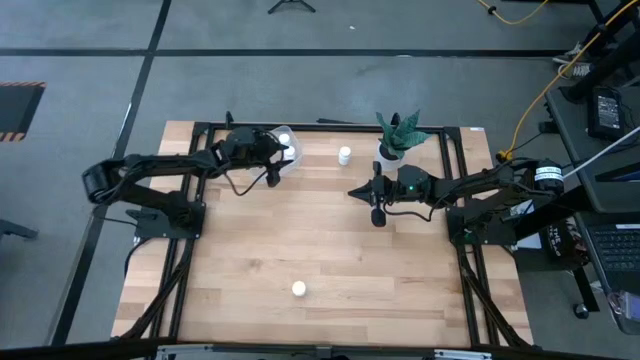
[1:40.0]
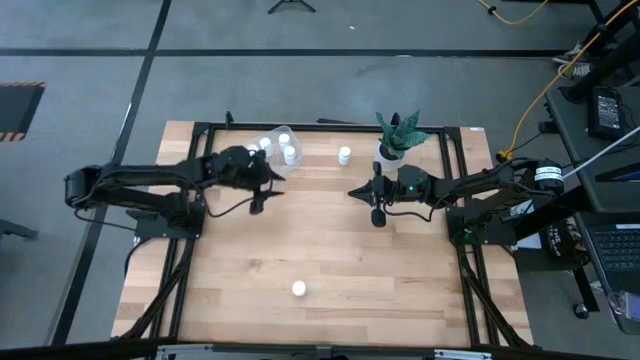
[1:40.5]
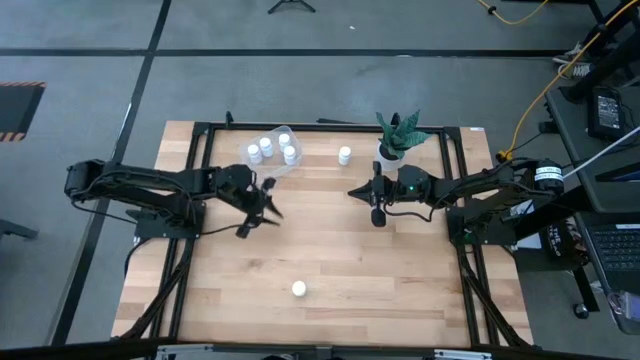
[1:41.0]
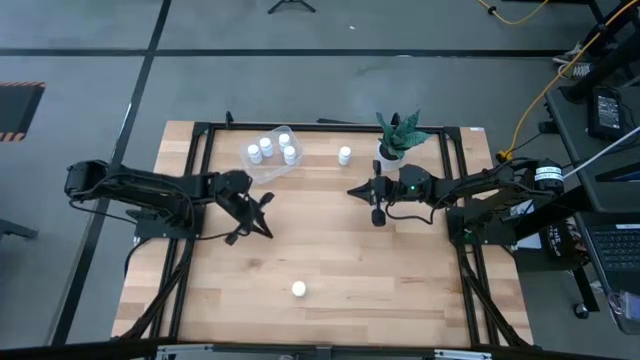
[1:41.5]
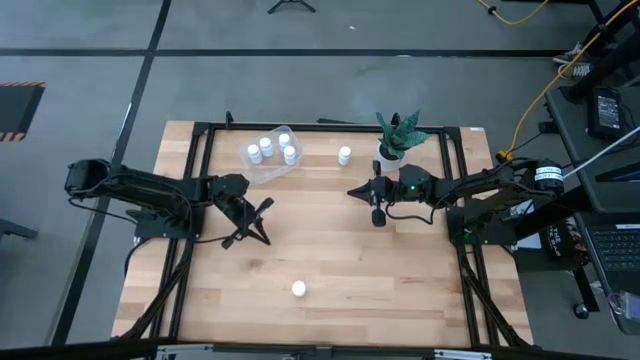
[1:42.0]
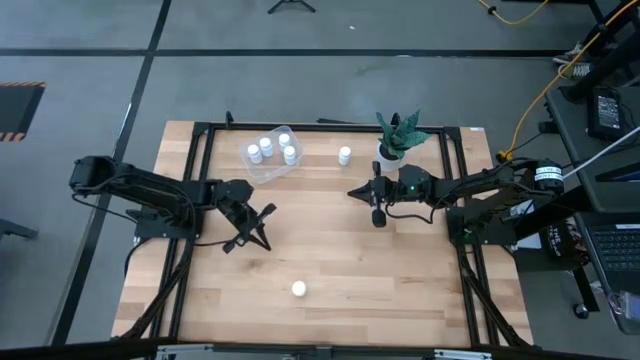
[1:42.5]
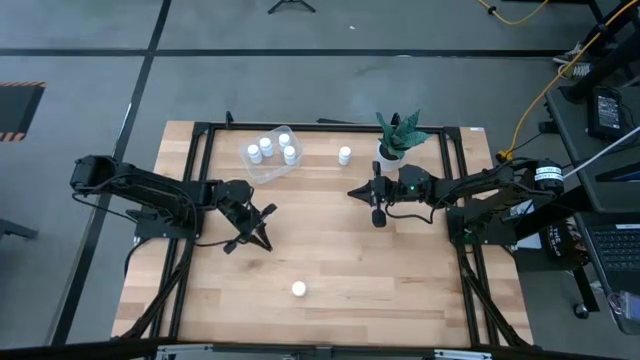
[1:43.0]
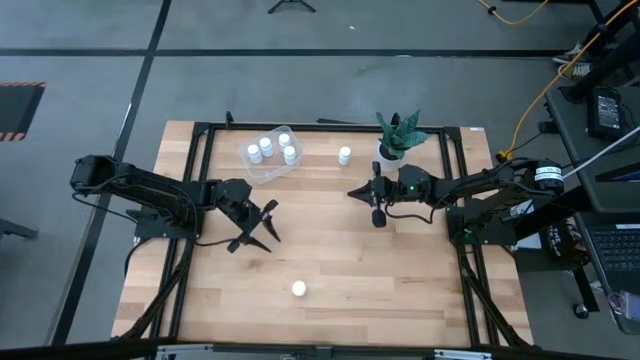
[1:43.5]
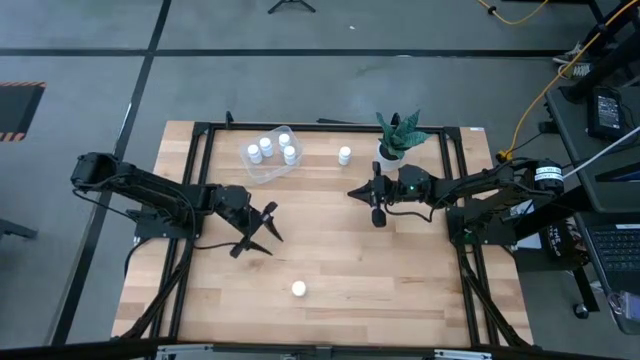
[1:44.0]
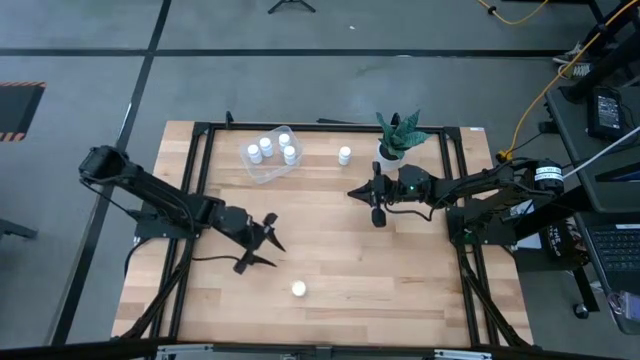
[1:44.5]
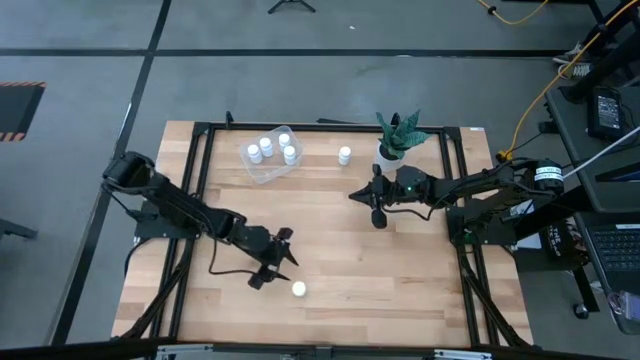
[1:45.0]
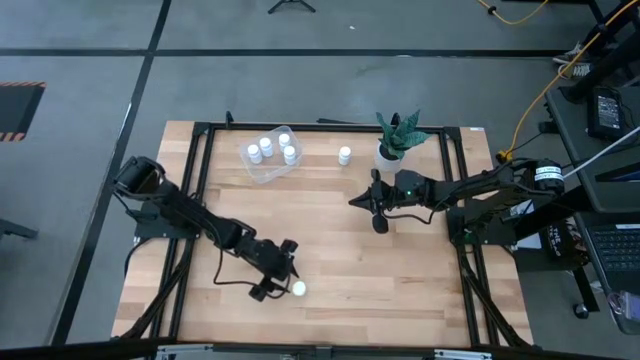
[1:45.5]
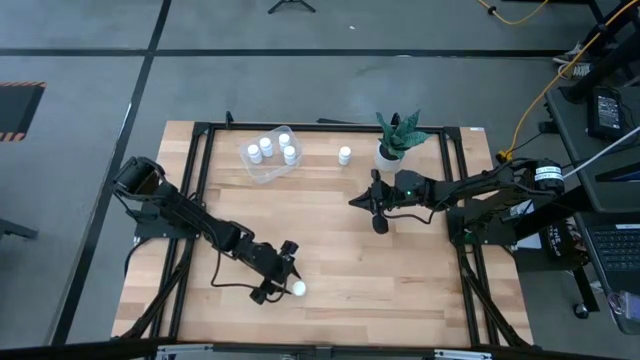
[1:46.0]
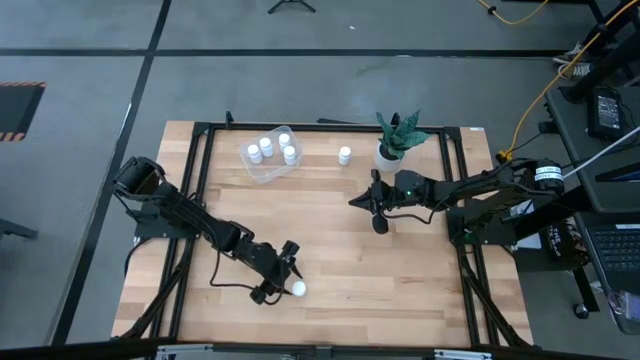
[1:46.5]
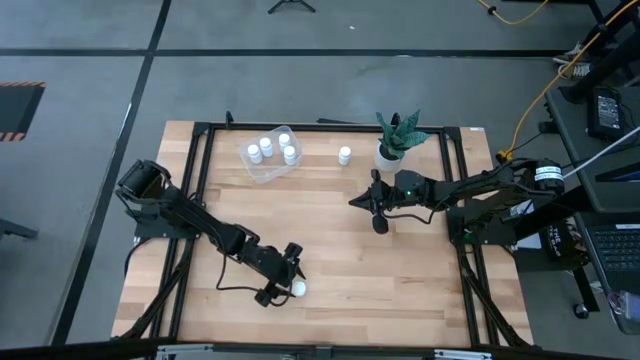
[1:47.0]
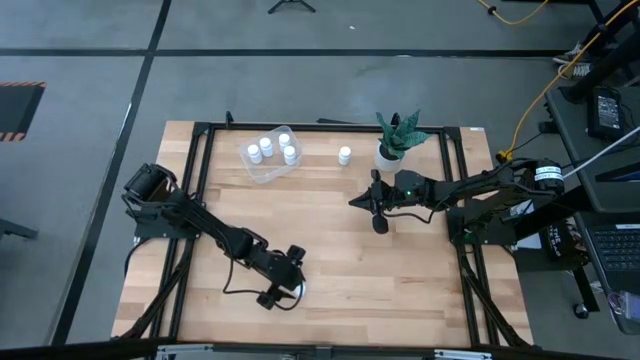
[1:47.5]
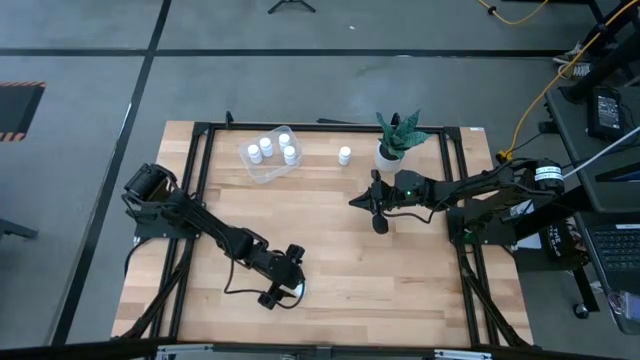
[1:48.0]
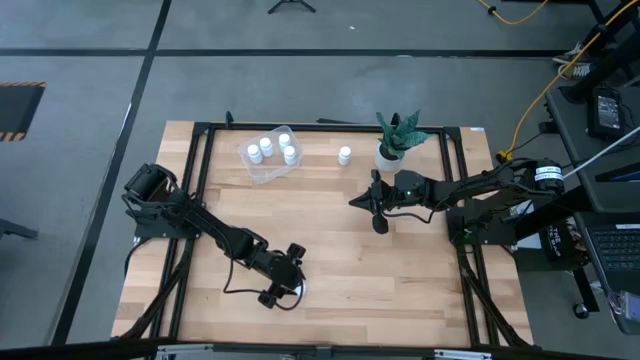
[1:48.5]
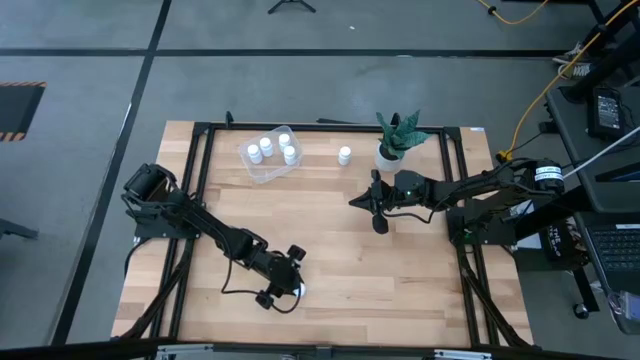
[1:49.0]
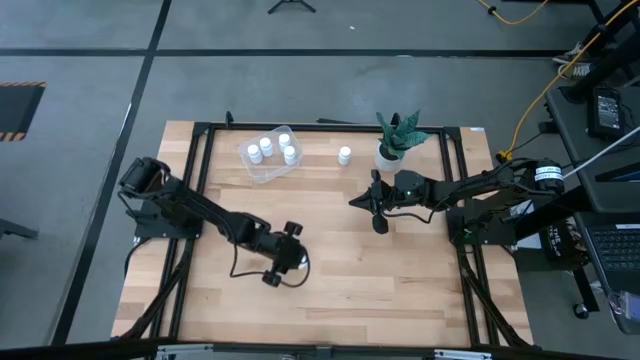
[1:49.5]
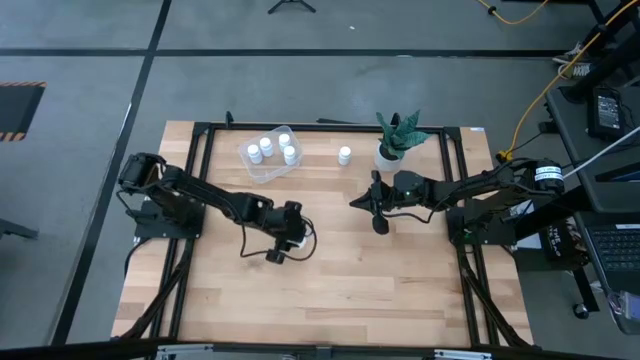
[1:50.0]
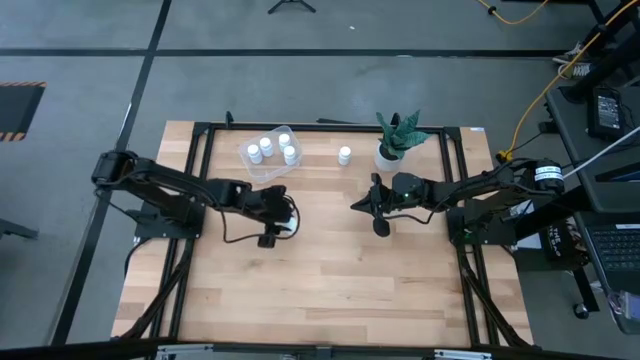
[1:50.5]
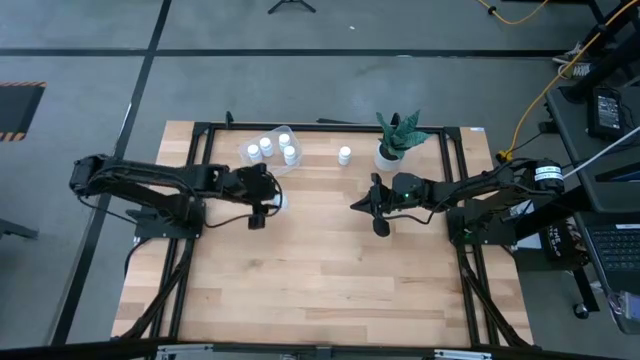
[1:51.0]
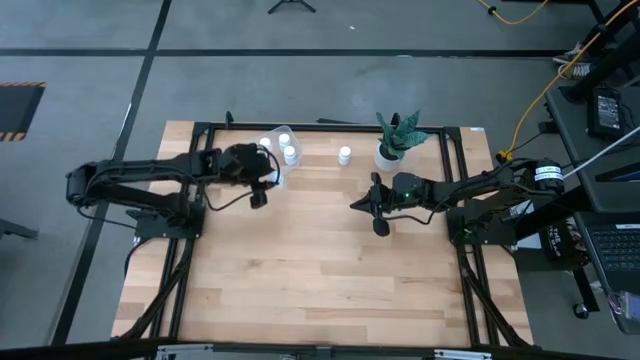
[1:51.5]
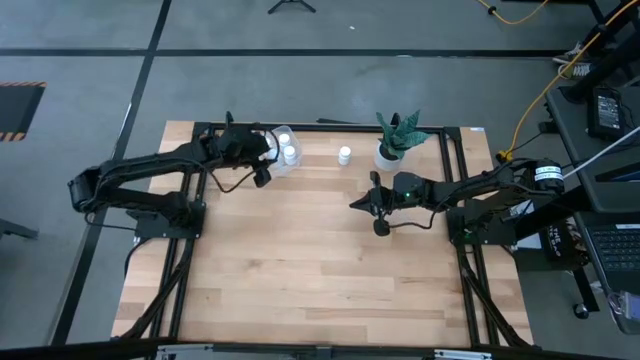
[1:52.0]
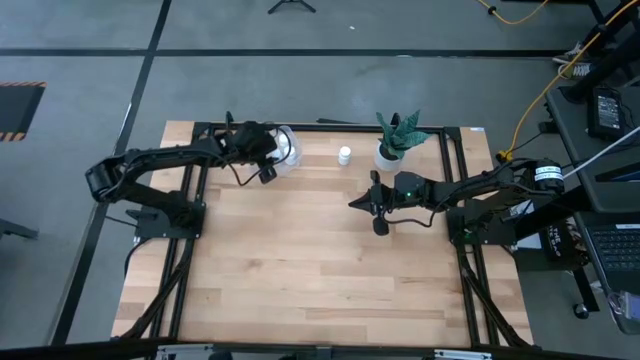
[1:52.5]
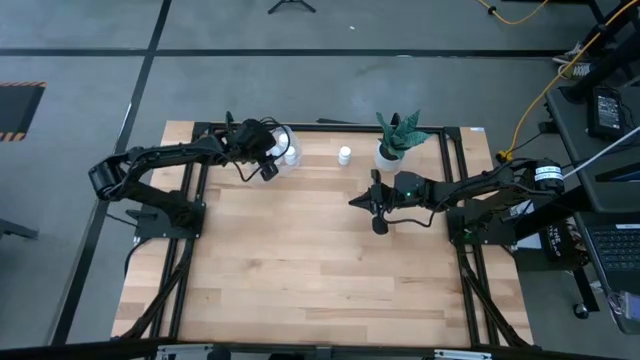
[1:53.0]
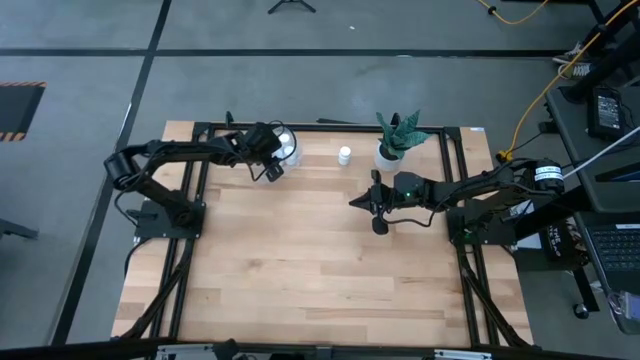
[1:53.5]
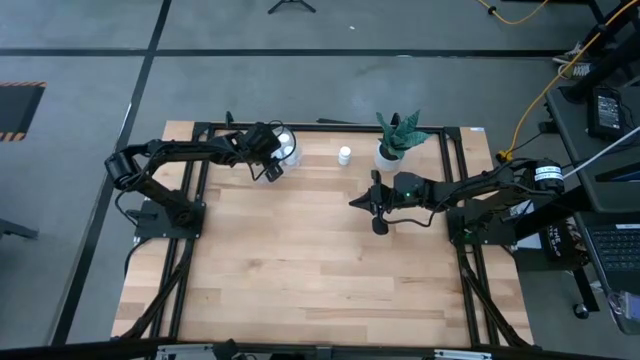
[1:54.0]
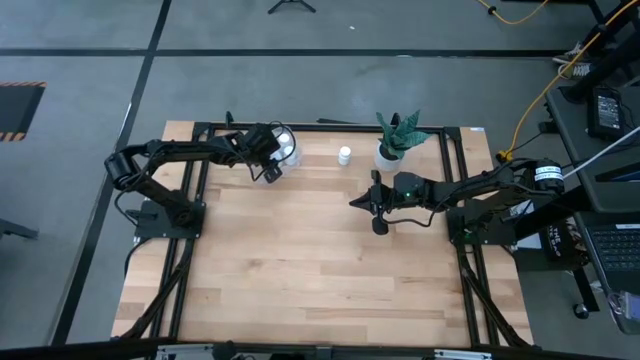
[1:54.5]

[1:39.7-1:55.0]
Task: Pick and place pill bottles into a basket
Put the white pill bottle into the transparent container

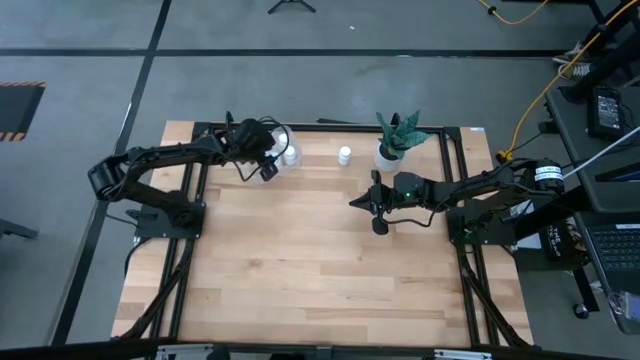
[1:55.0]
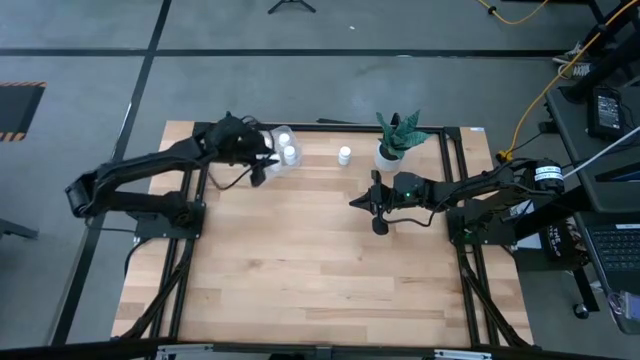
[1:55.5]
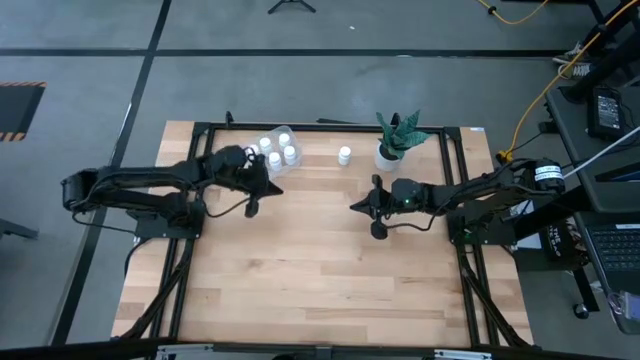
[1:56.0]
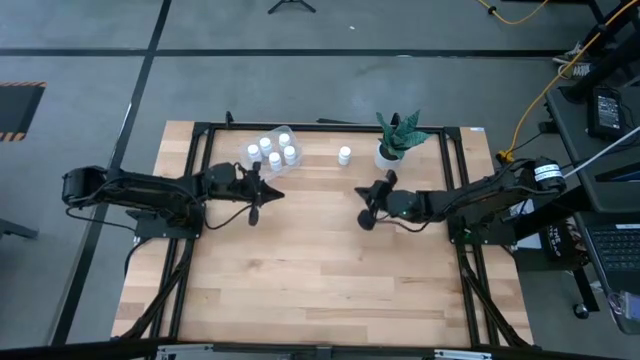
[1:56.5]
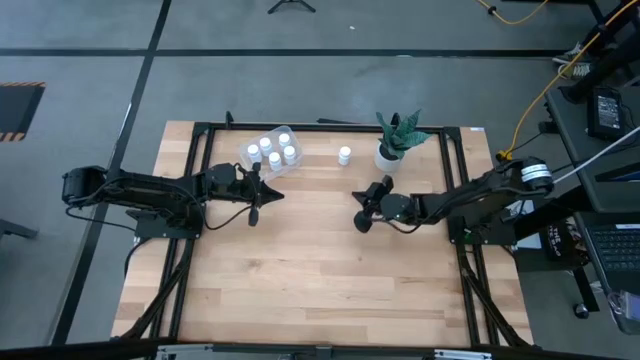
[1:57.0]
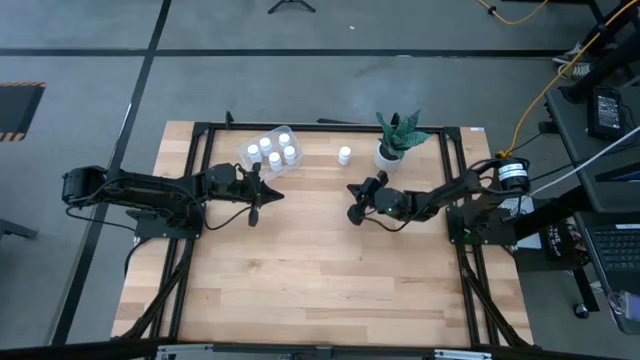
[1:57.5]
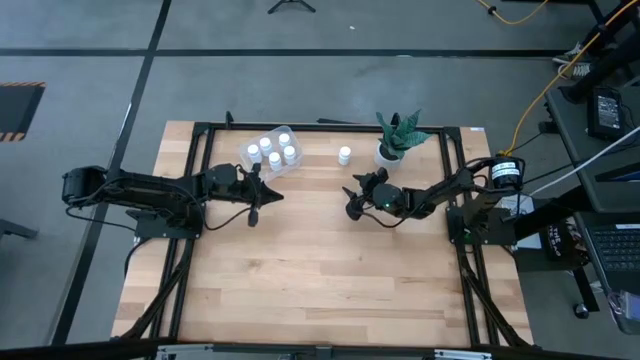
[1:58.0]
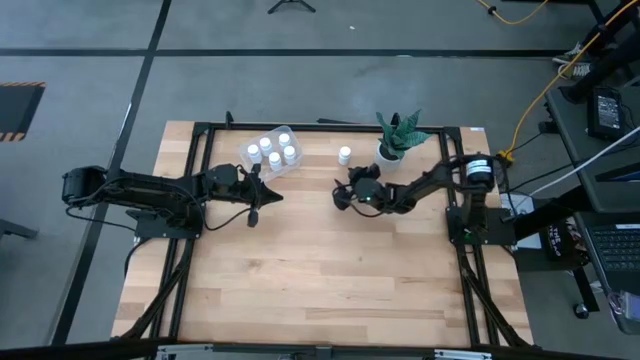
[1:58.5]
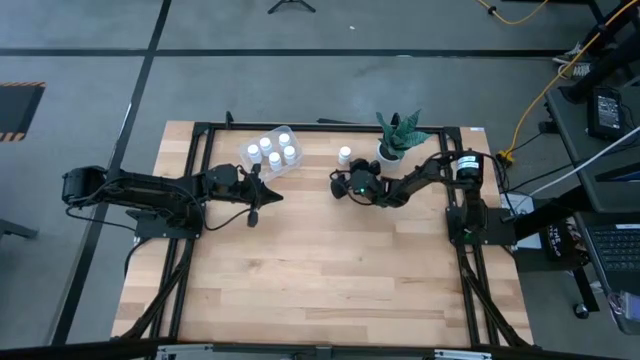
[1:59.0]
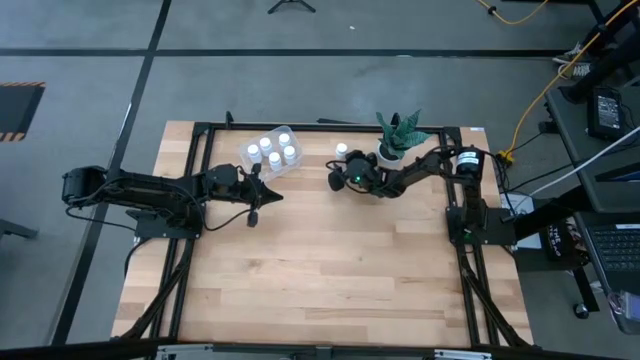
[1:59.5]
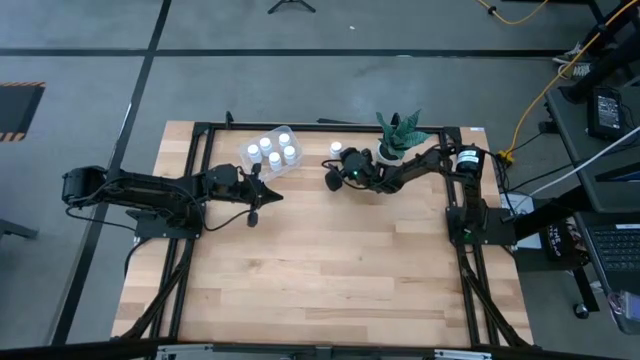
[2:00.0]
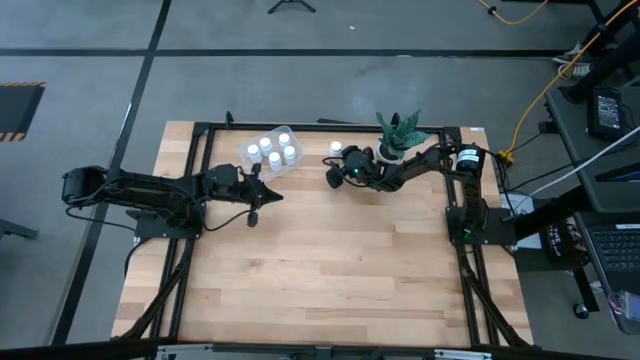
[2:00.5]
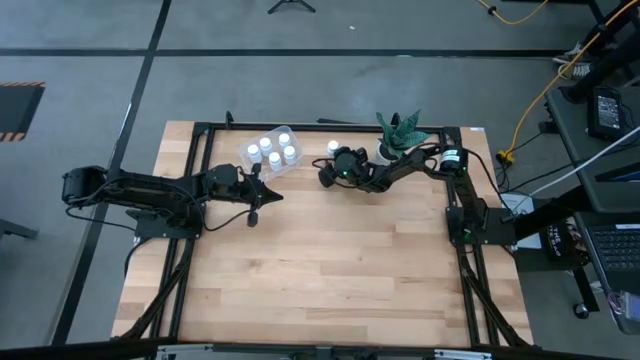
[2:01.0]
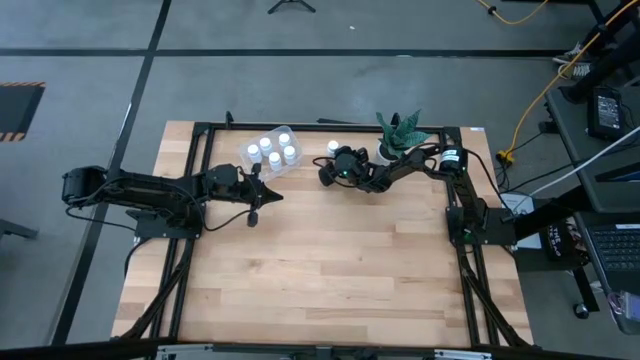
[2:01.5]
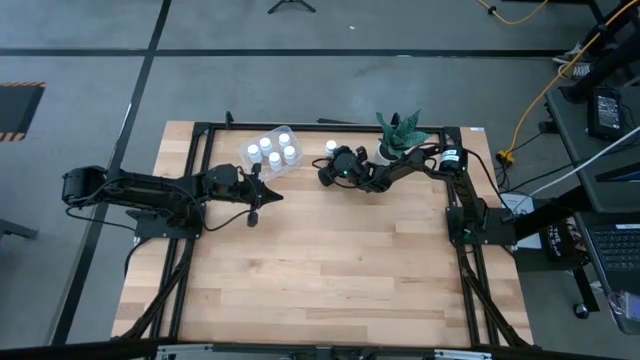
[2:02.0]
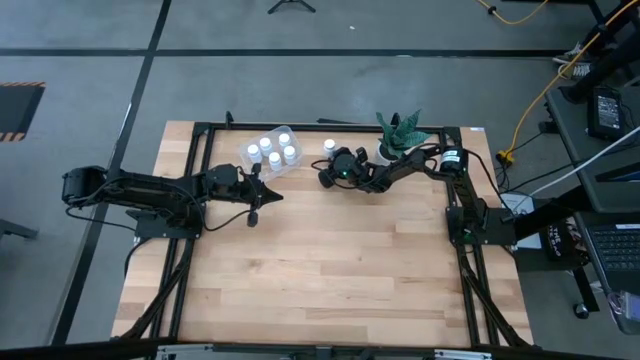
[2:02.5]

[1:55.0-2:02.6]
Put the white pill bottle into the transparent container
